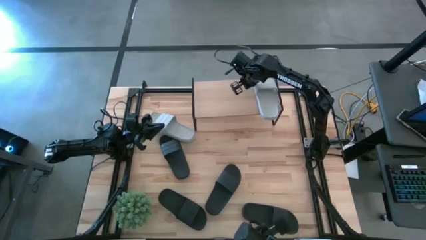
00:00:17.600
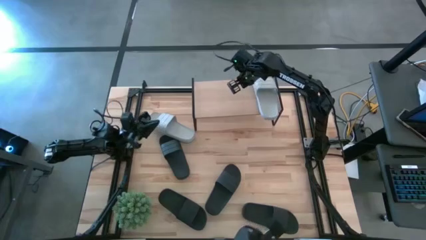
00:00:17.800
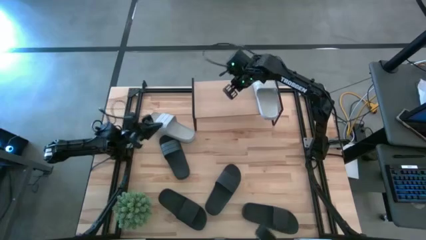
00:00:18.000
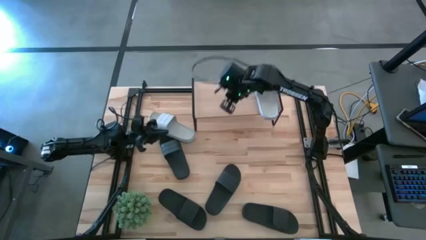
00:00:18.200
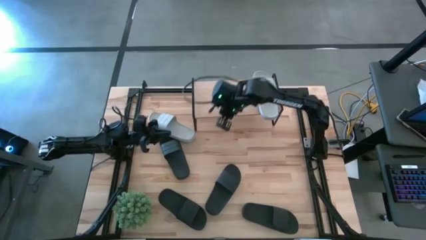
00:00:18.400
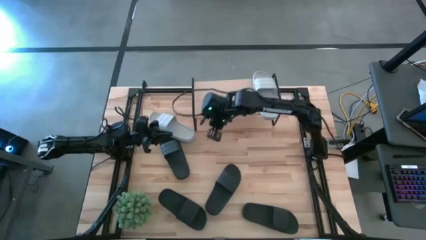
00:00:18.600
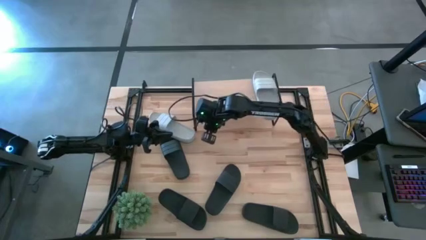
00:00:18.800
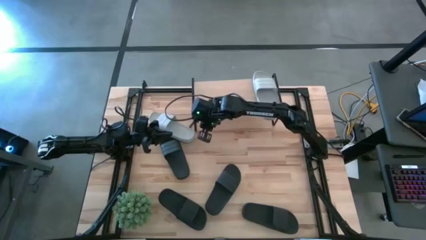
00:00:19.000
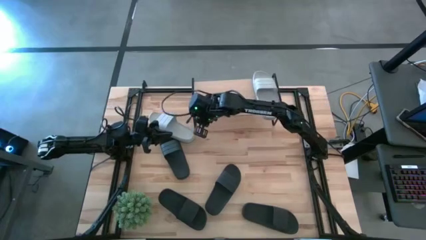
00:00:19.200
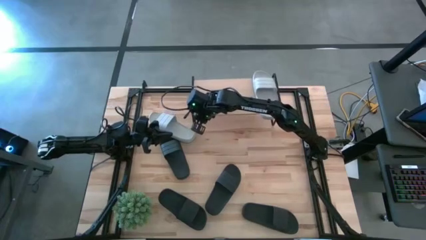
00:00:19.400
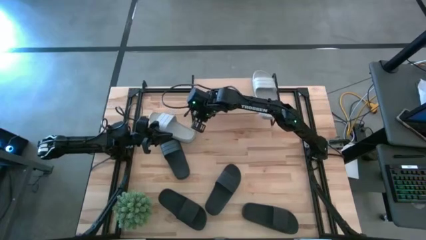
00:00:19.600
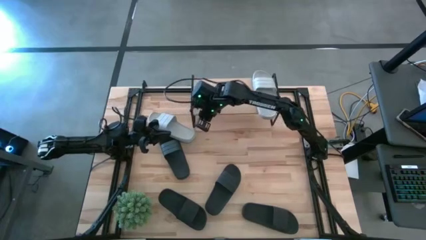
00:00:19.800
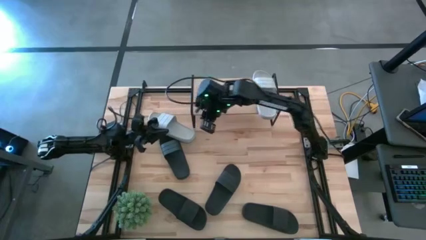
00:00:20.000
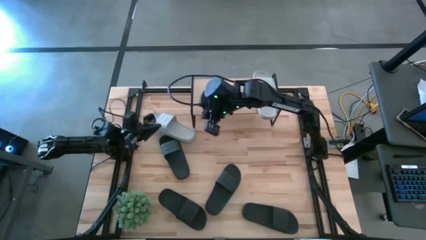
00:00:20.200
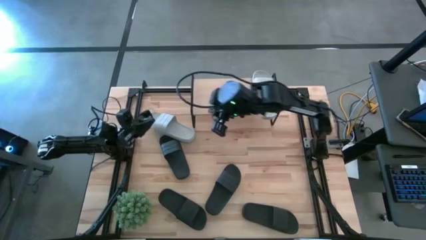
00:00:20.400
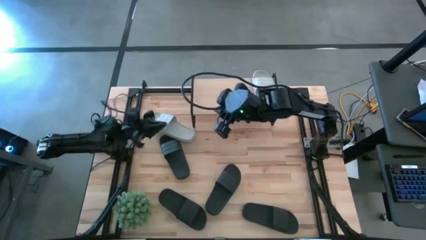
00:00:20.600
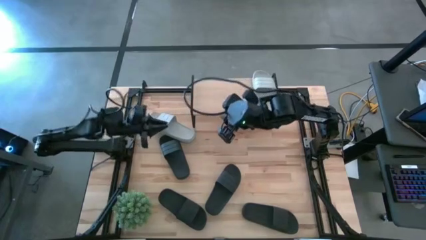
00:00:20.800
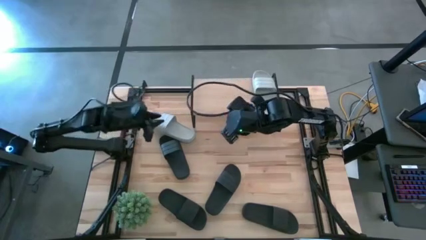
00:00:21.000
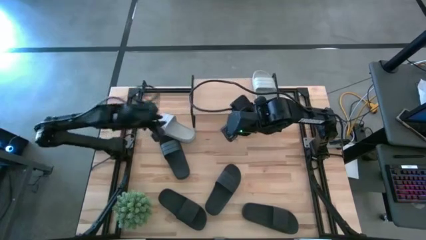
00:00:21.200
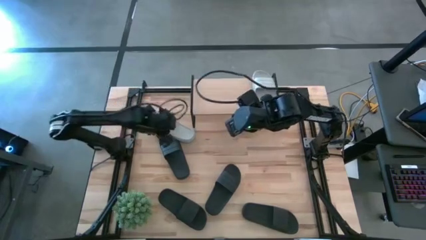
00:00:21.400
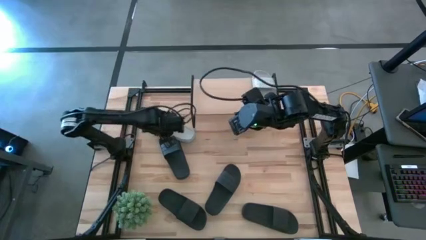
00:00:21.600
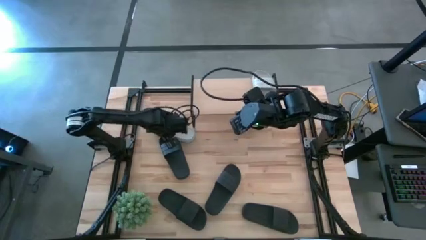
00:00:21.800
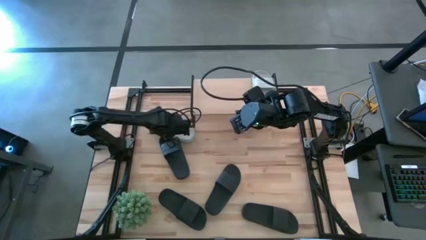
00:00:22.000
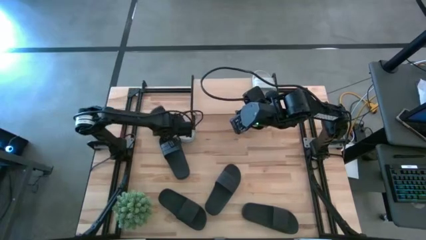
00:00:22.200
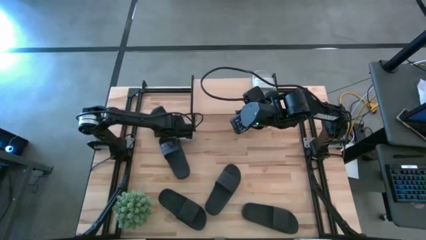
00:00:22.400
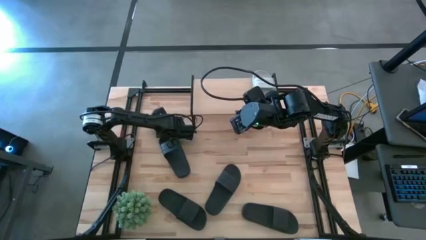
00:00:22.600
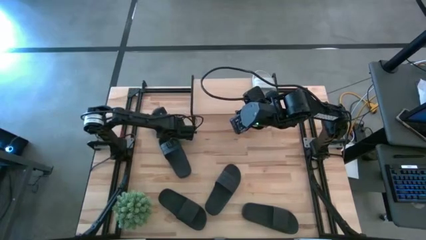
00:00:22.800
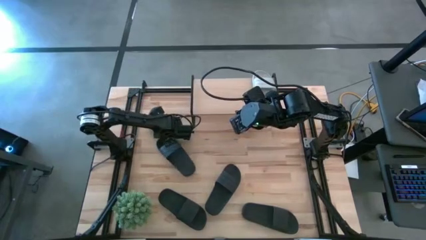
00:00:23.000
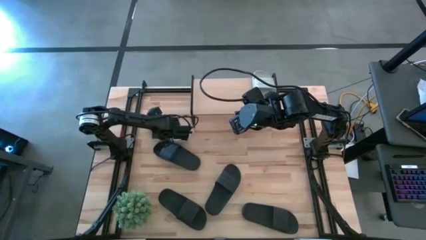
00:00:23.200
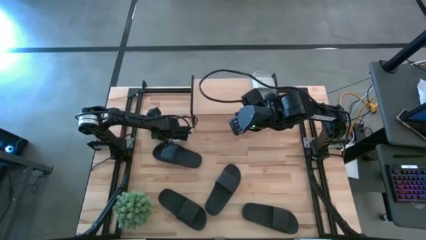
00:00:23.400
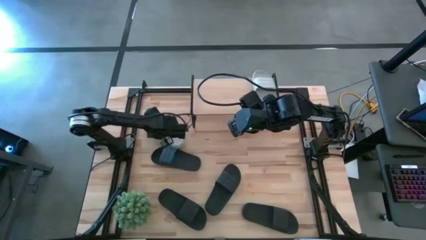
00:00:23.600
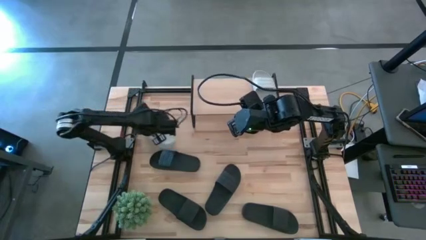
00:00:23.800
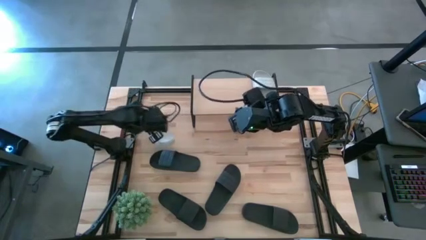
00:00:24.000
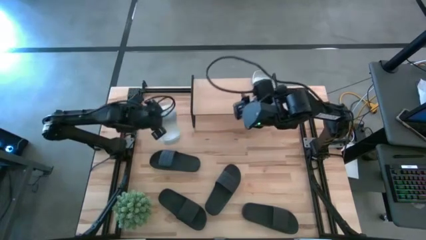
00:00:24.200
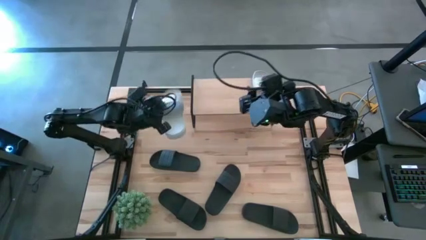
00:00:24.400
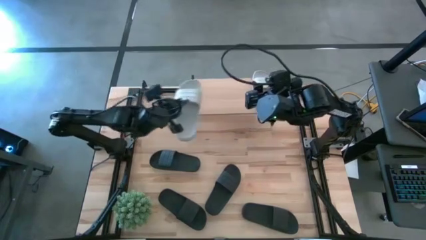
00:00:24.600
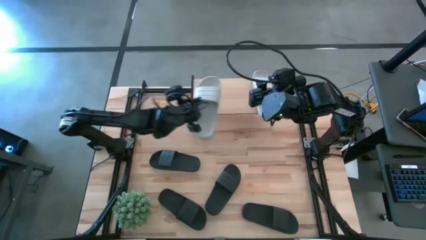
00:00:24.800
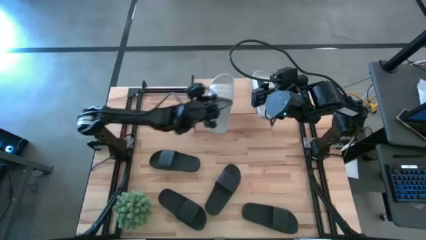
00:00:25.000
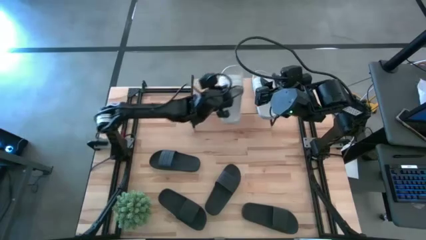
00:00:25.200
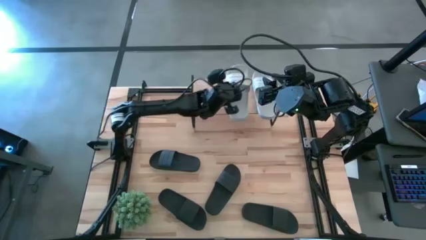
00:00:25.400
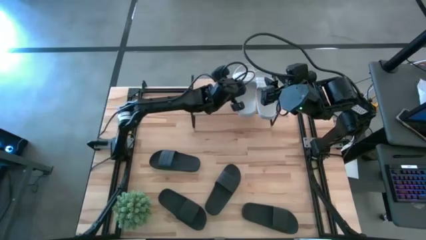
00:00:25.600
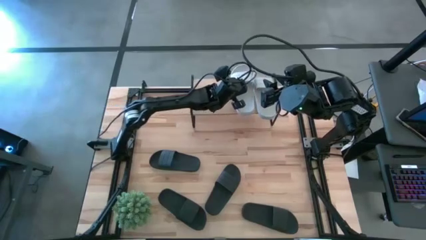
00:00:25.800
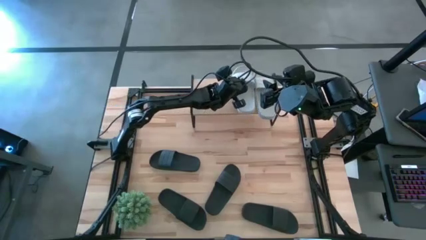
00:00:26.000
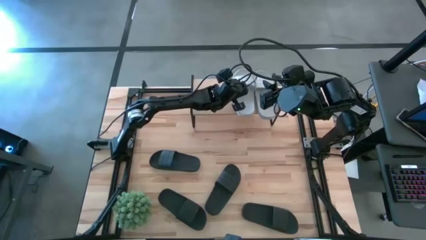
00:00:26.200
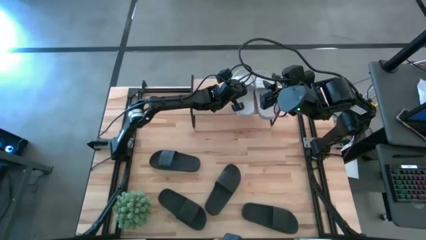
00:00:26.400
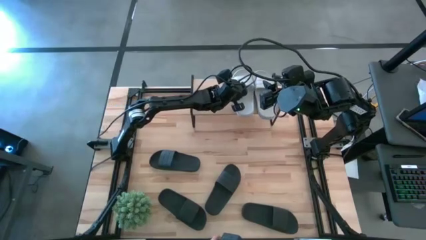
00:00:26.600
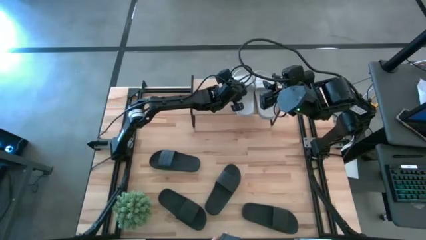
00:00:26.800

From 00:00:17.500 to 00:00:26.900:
Task: Pick and place slides into the shelf
Put the gray slide on the shelf

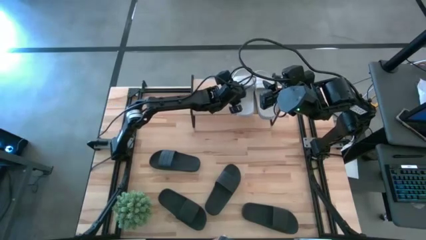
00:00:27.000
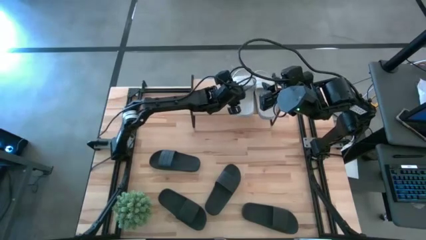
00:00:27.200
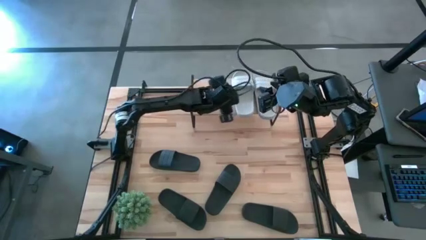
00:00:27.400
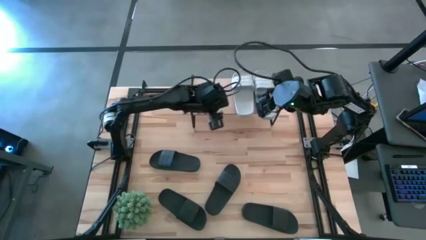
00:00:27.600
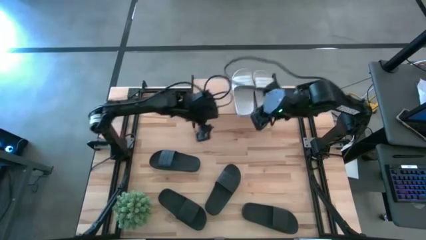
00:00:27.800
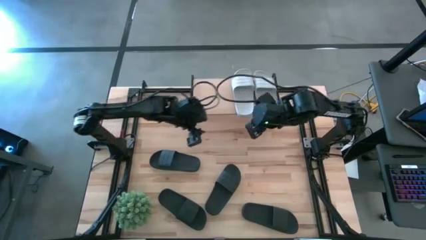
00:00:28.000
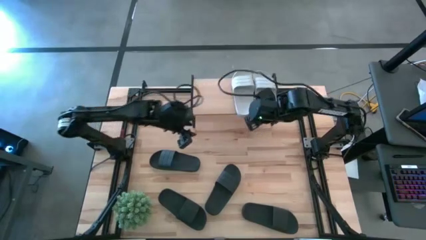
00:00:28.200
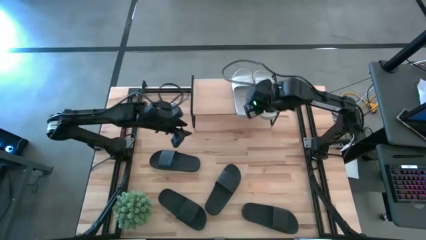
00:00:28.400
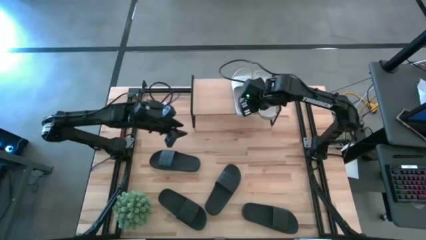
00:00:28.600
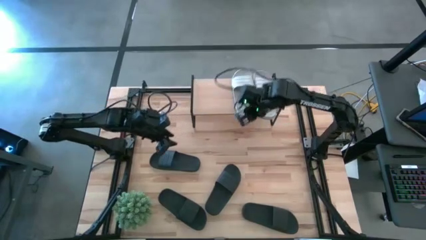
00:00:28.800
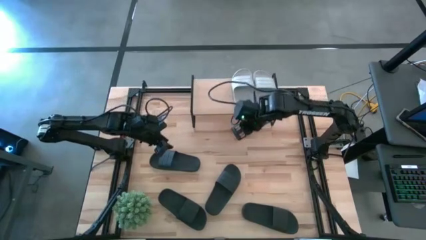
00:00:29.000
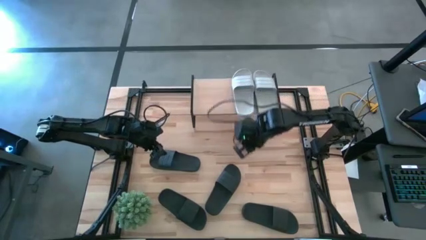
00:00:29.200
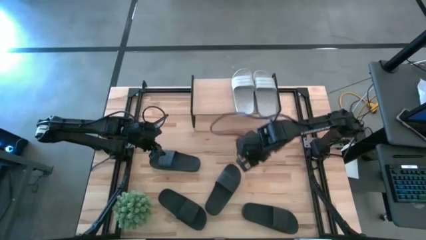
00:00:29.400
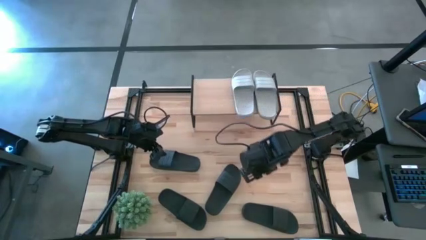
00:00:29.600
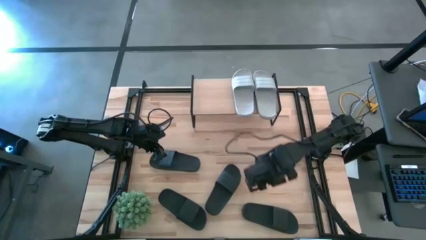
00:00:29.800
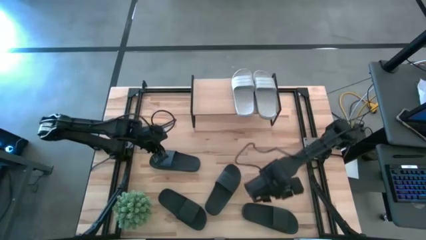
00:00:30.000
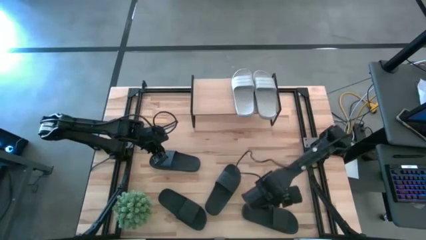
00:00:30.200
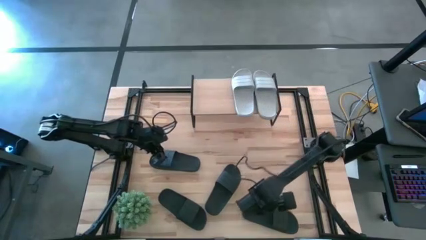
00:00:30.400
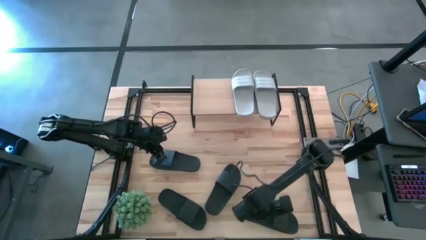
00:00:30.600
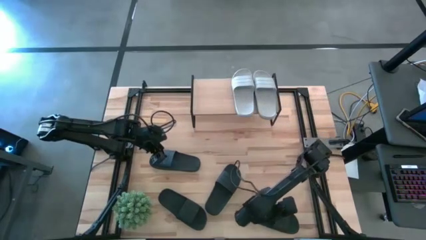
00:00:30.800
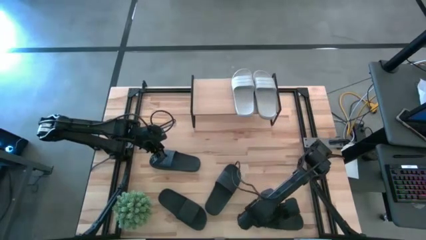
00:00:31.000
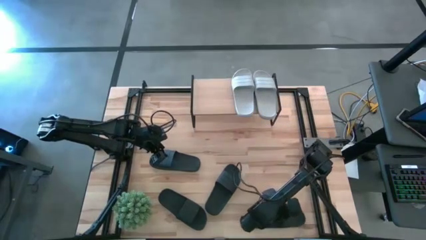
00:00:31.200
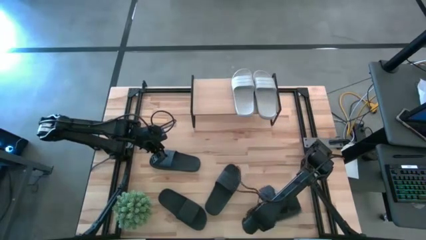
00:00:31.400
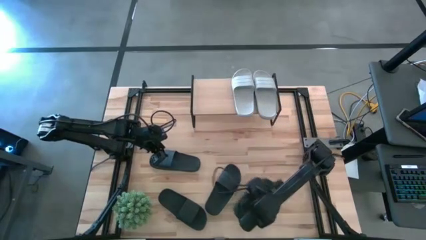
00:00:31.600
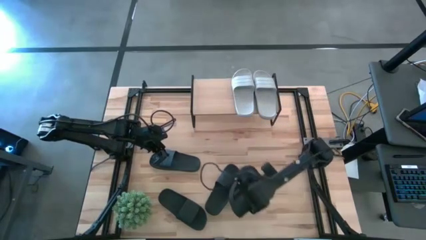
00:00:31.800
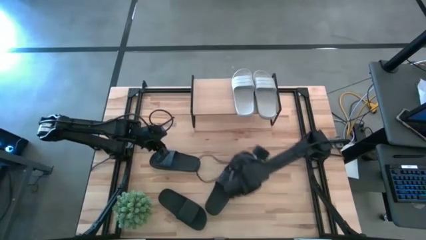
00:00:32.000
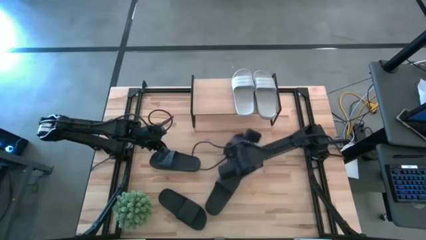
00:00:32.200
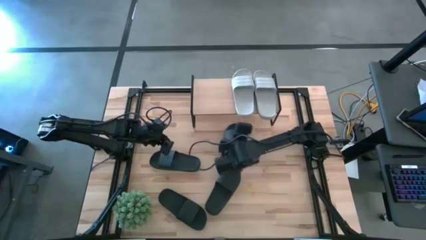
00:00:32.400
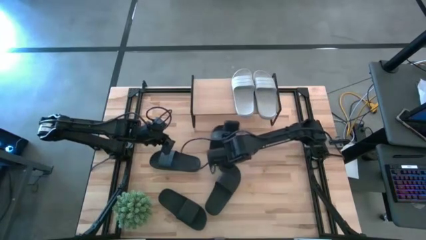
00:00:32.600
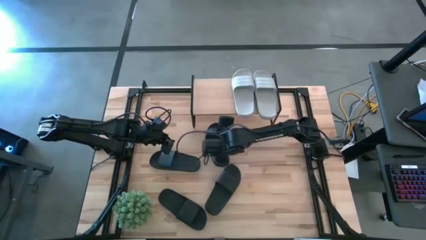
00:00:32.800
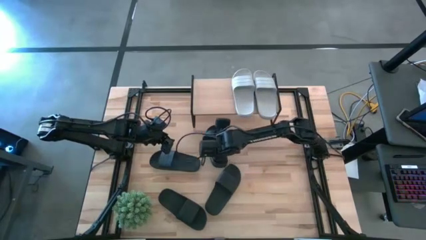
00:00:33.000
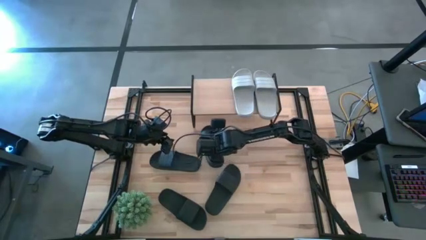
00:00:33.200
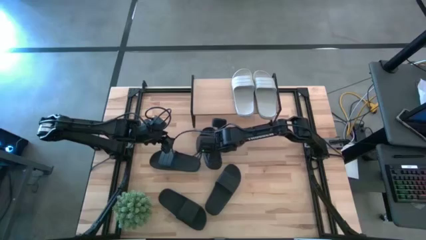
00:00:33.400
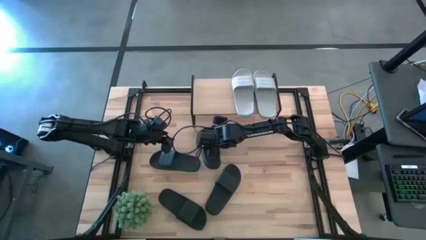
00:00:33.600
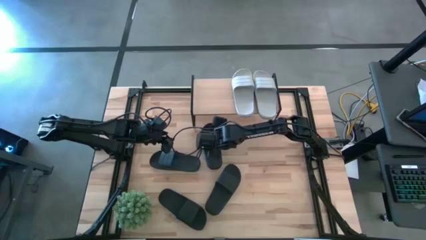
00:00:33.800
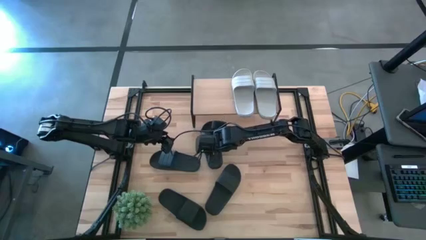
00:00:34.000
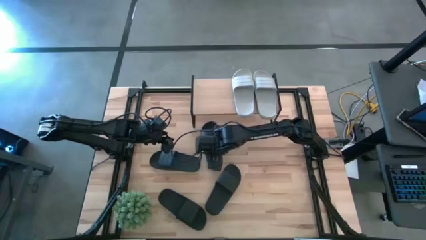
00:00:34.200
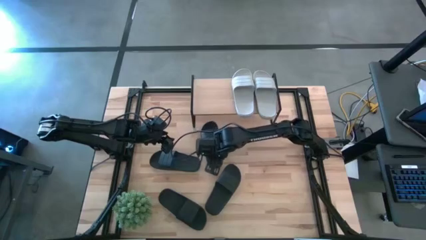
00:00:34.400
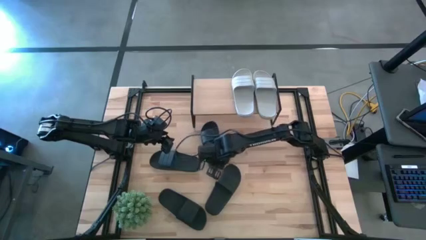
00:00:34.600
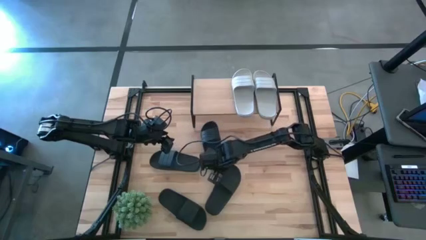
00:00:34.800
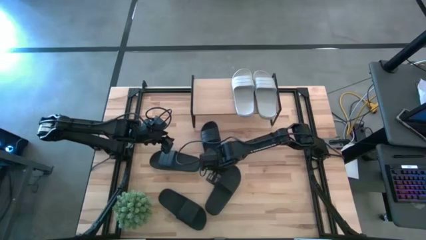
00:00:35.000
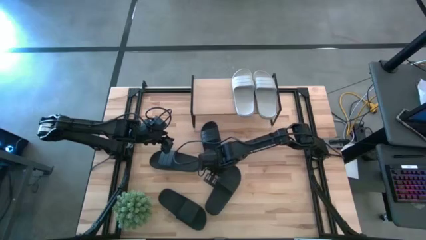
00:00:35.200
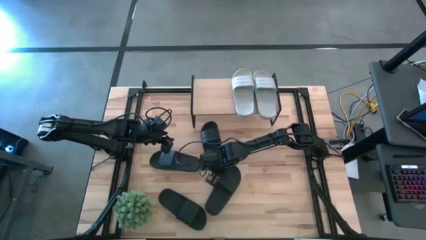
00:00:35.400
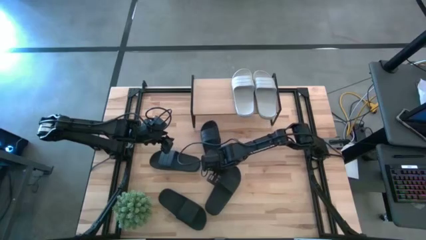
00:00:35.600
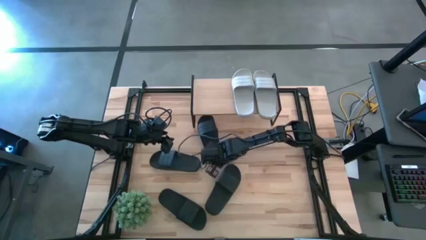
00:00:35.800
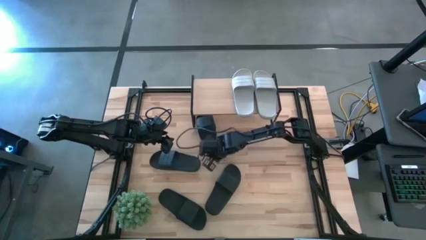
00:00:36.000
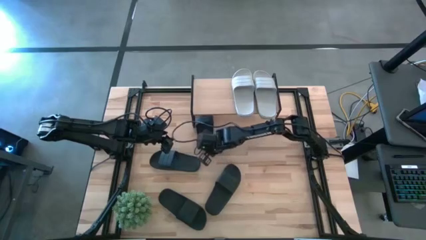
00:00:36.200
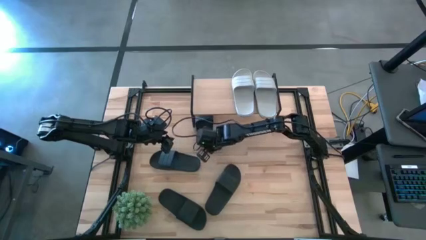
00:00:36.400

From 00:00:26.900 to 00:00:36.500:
Put the black slide under the shelf
